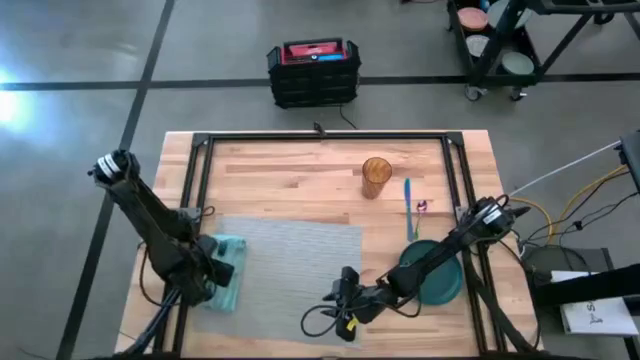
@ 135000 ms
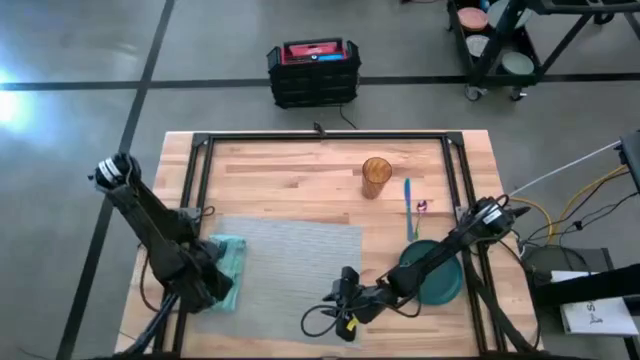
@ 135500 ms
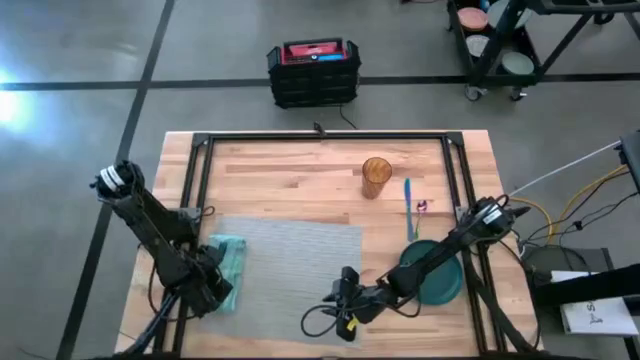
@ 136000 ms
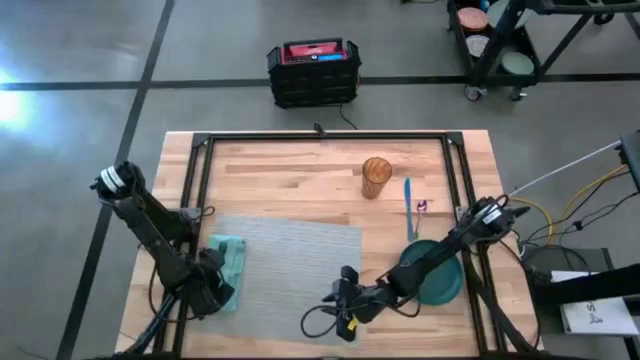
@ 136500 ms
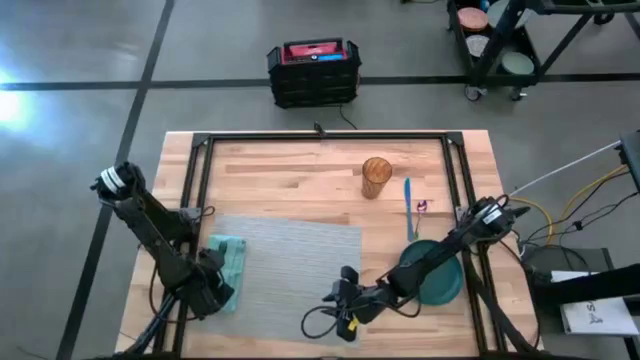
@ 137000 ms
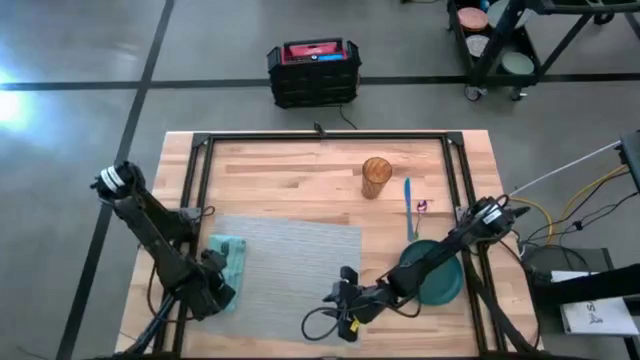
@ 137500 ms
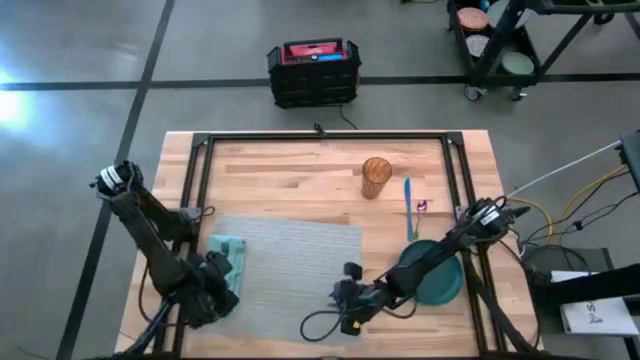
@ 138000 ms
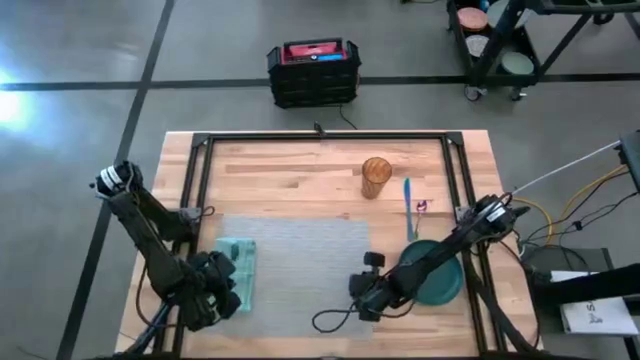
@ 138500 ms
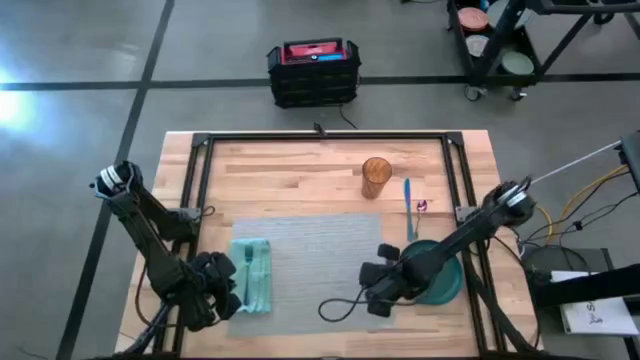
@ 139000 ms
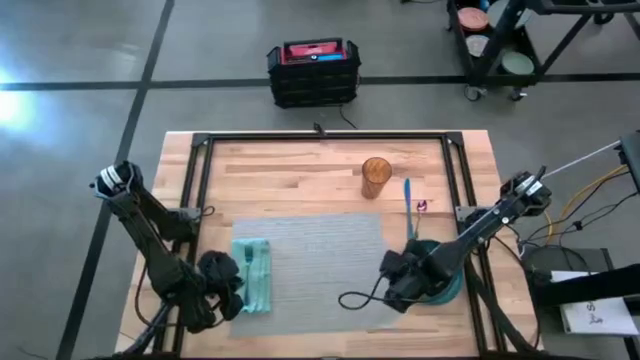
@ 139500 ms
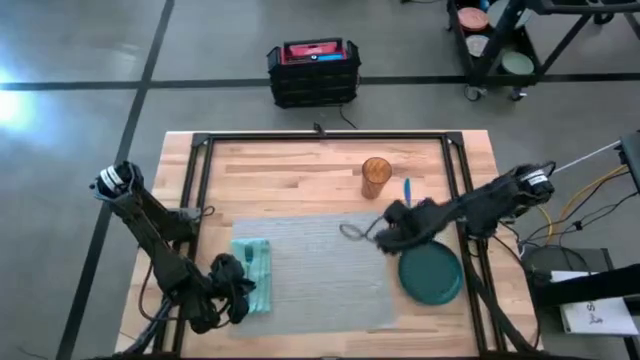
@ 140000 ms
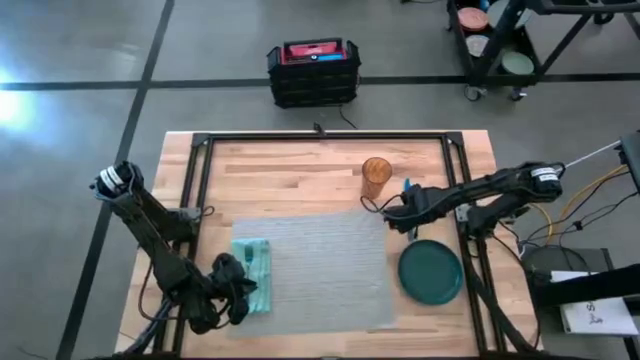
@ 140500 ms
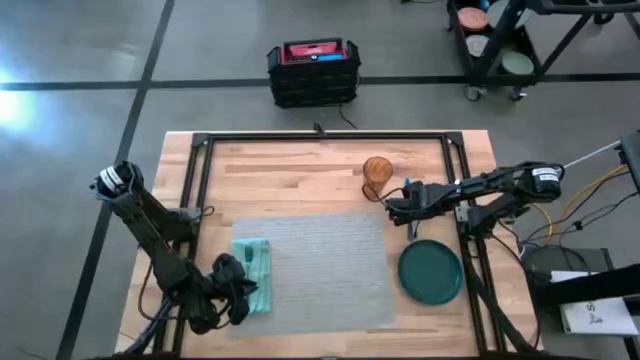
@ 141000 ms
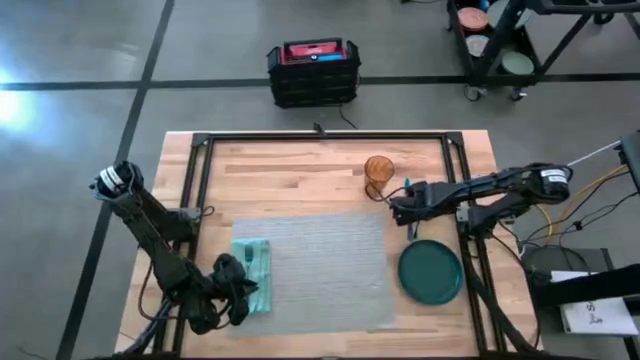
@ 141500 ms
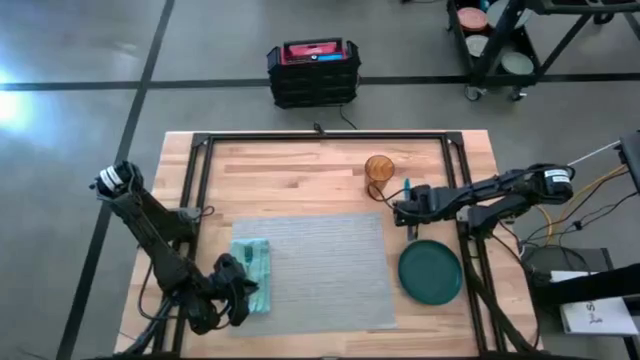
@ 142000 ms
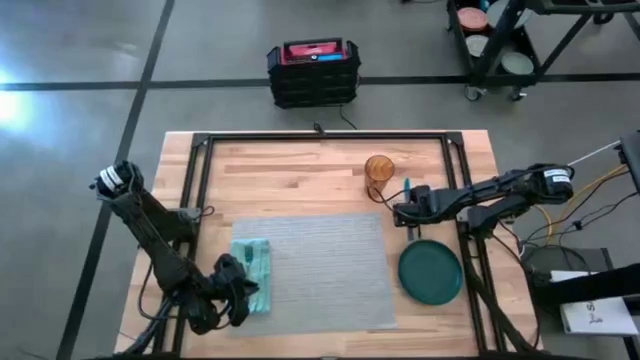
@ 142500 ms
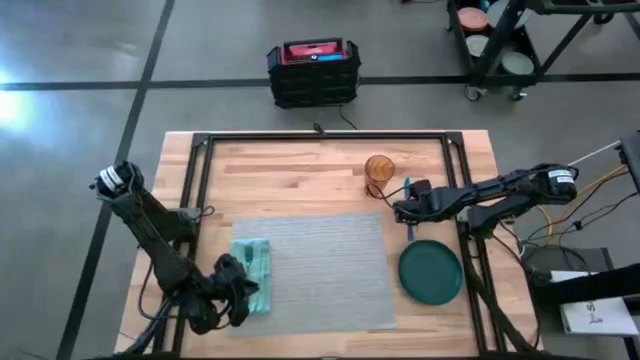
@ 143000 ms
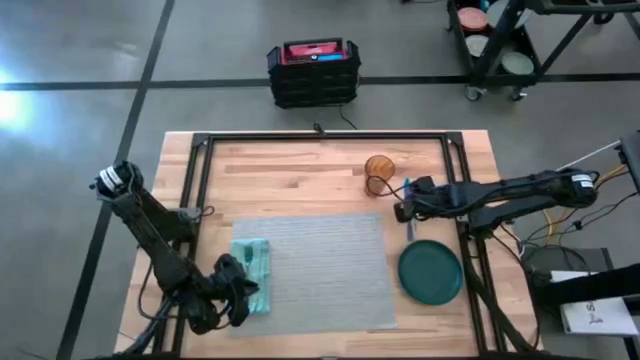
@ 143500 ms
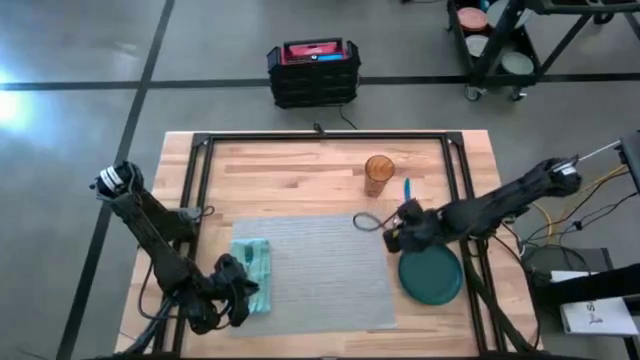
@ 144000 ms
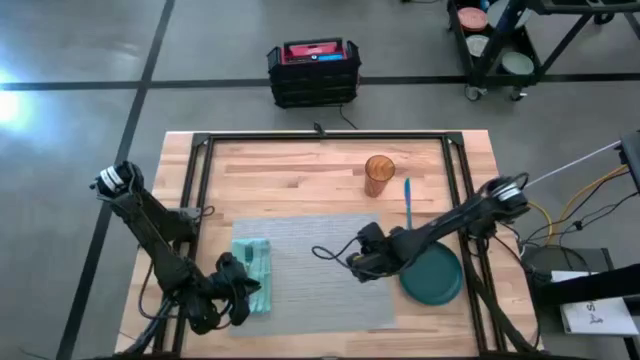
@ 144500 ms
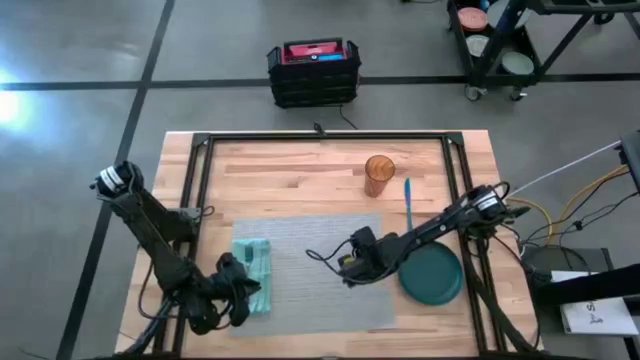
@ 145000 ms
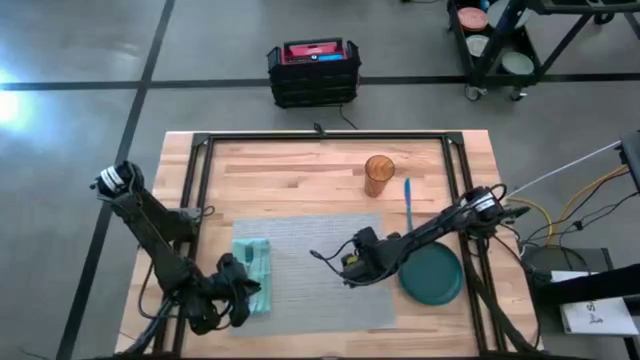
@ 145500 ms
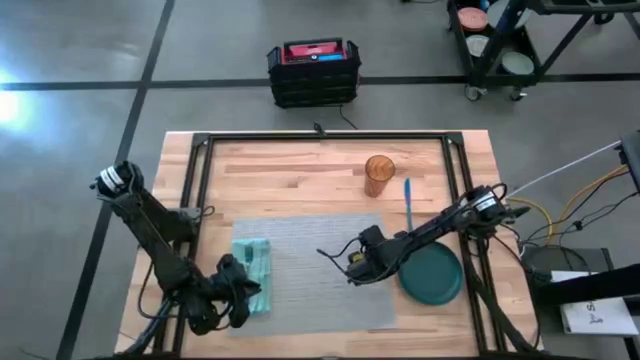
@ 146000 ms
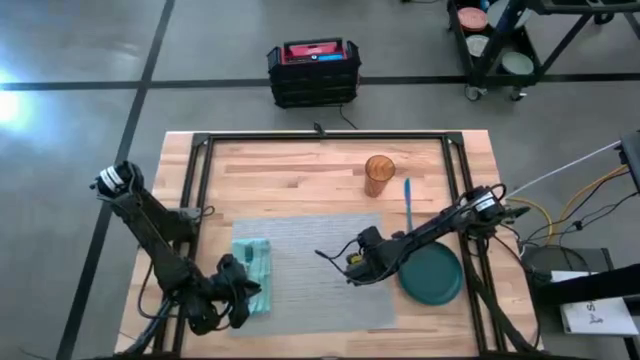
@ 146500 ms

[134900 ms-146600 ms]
Task: Set table place
Put the tablespoon to the right side of the gray table mat

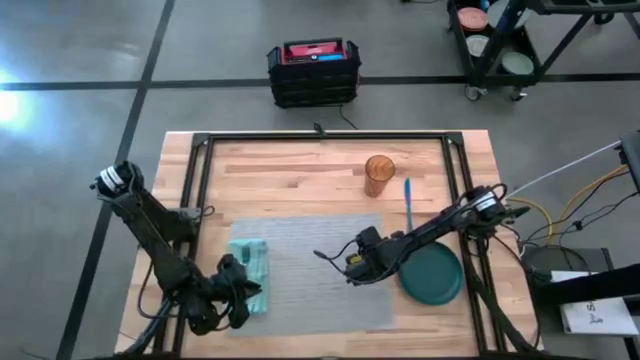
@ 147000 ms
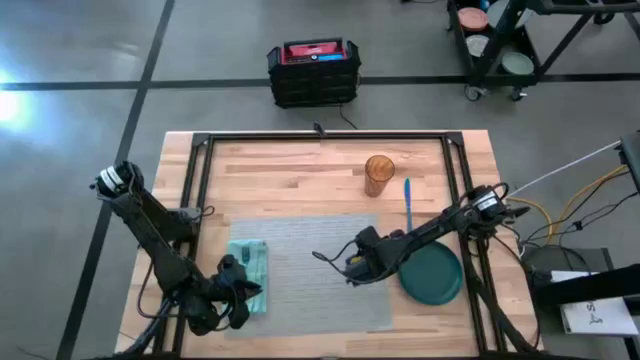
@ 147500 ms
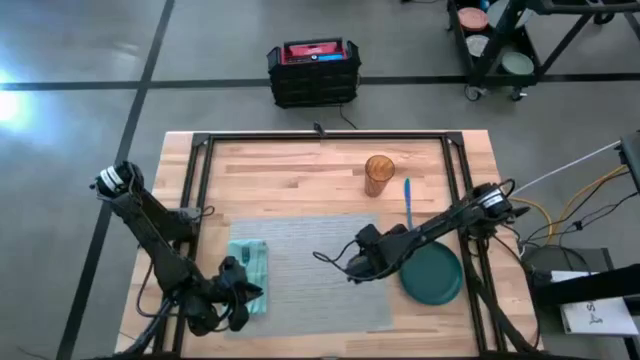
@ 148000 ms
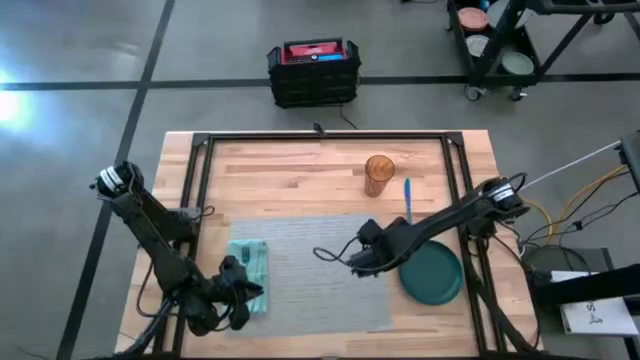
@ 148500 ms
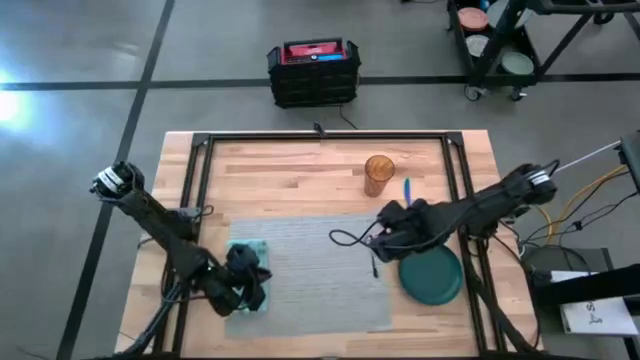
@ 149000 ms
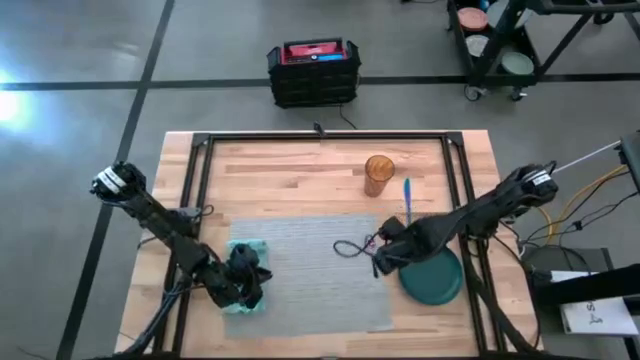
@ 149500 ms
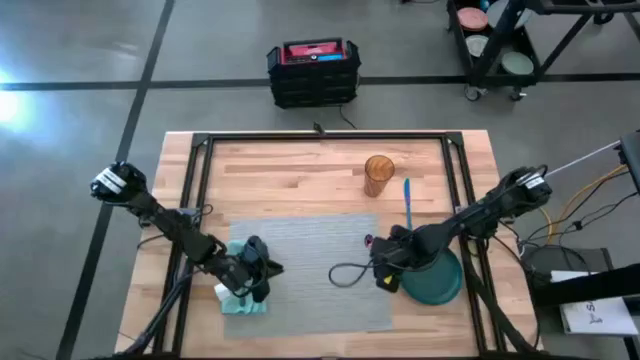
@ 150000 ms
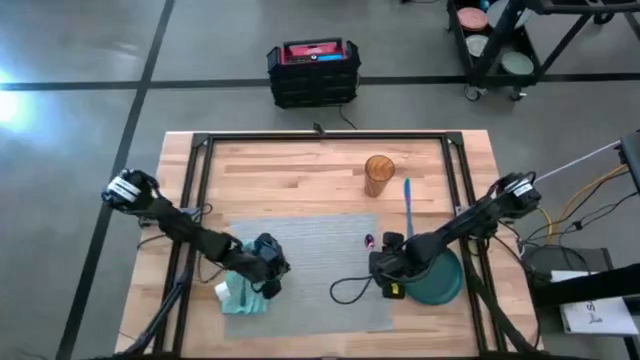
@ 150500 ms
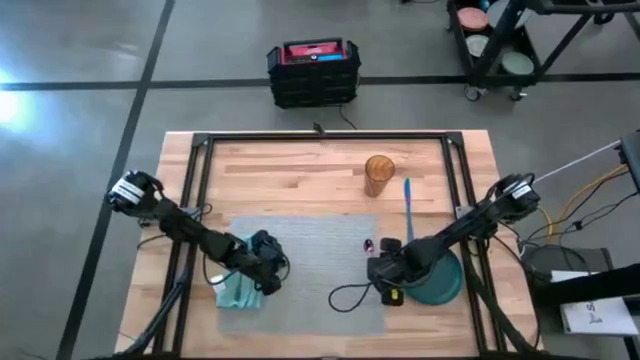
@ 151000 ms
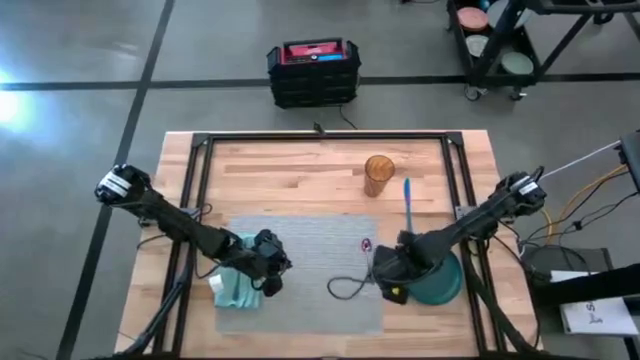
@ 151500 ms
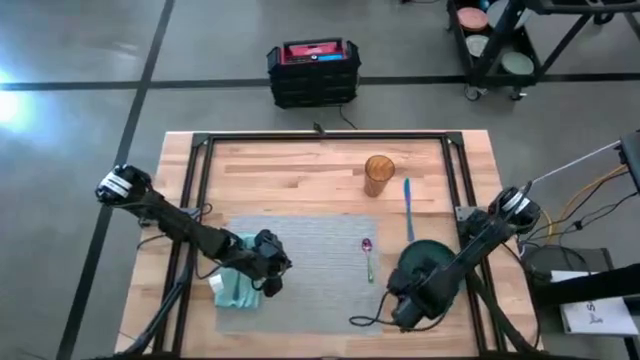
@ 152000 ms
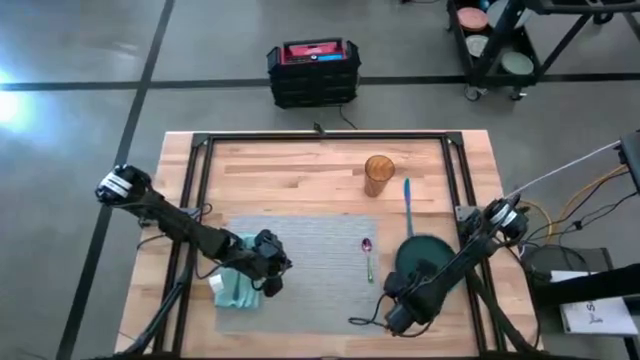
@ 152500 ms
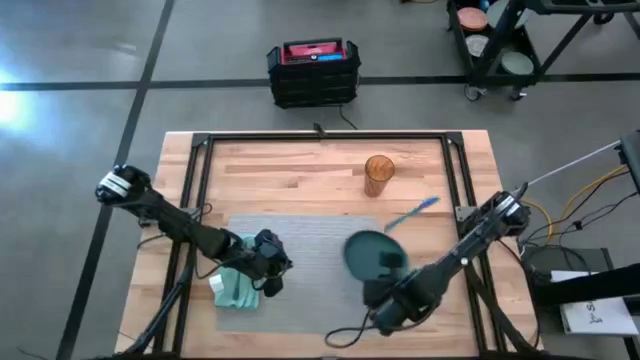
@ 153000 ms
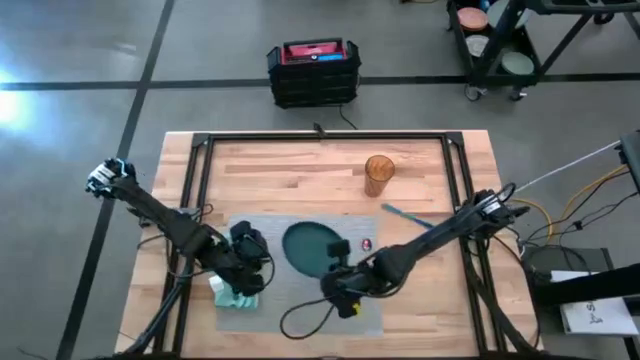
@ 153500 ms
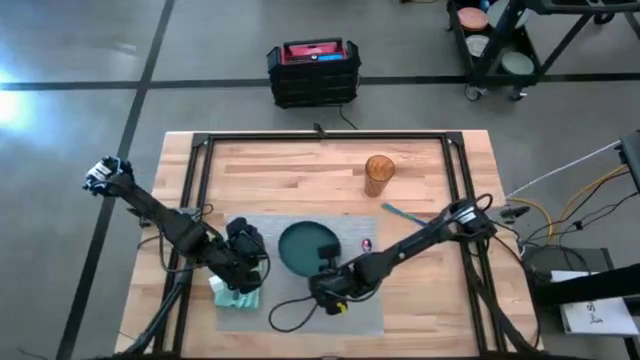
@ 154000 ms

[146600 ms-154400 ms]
Put the dark green plate to the center of the gray table mat

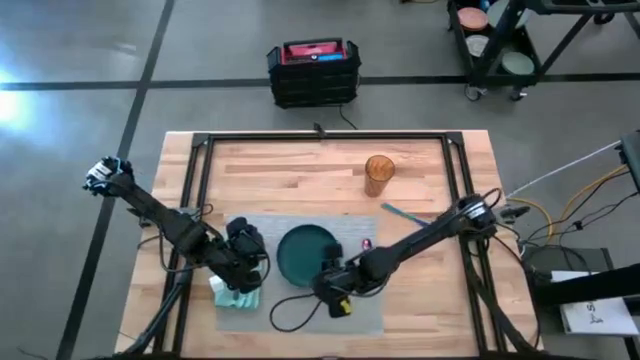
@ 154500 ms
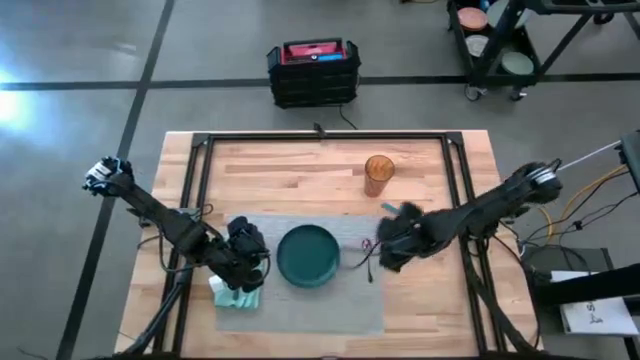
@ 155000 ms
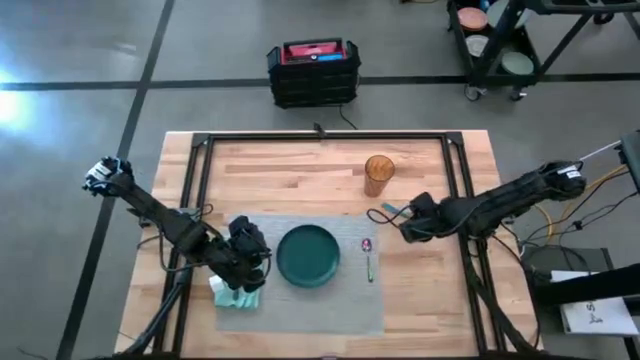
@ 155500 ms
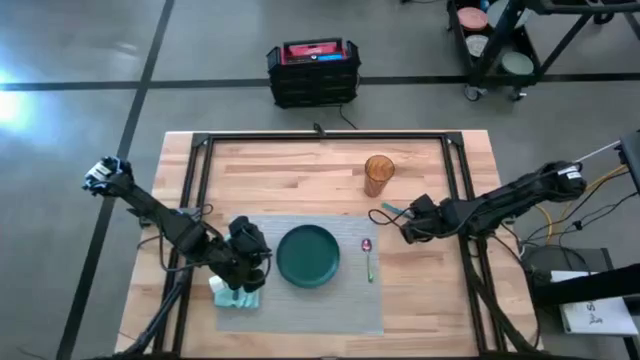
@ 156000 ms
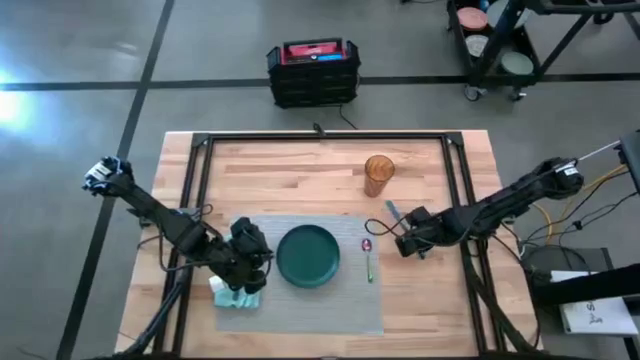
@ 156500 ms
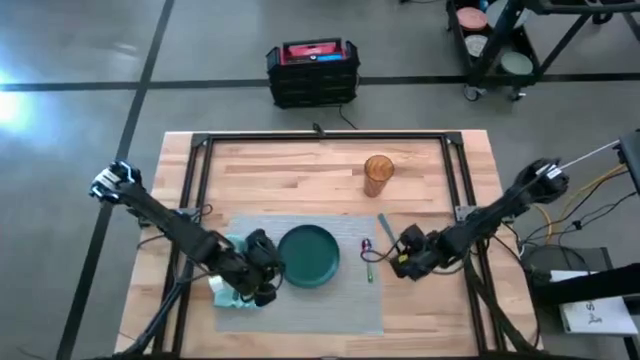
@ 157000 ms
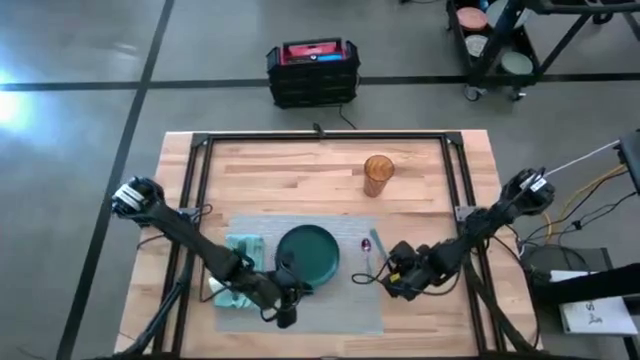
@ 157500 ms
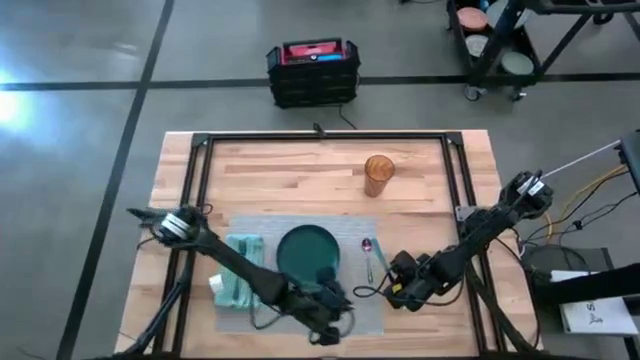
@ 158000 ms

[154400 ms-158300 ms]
Put the table knife to the right side of the dark green plate on the table mat
